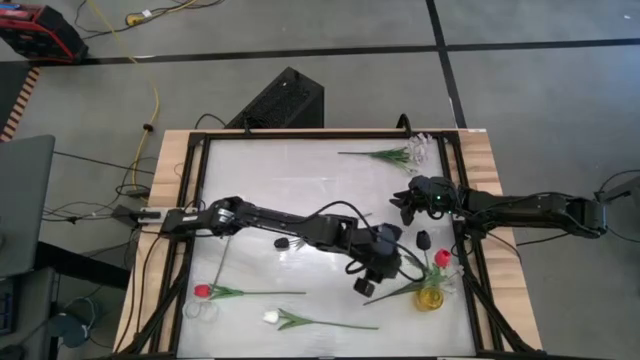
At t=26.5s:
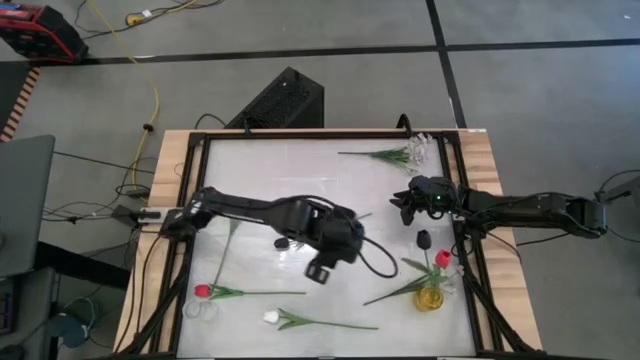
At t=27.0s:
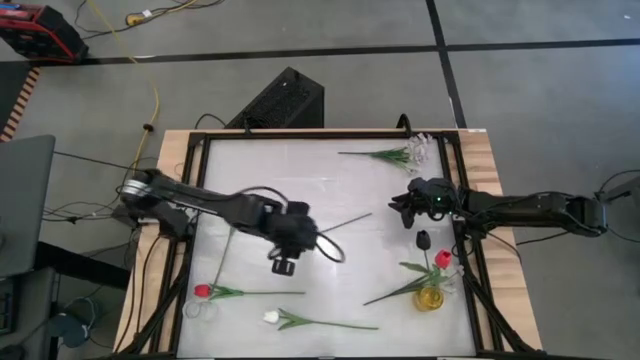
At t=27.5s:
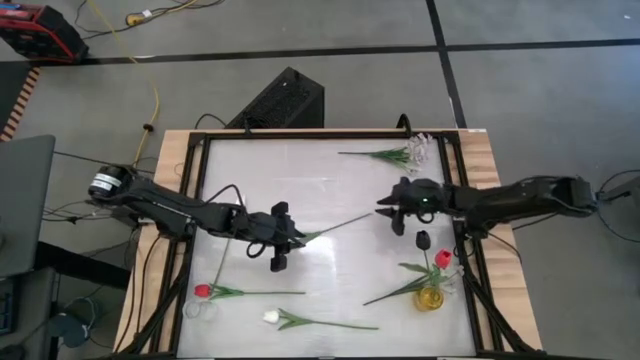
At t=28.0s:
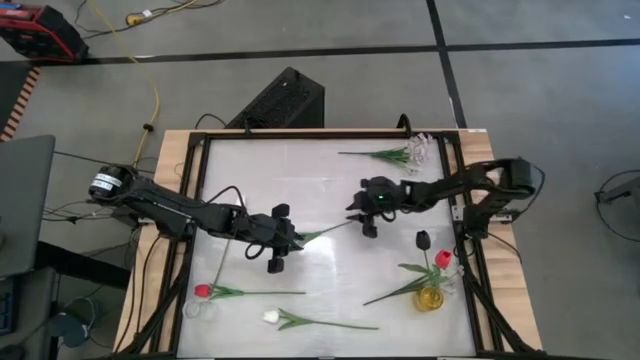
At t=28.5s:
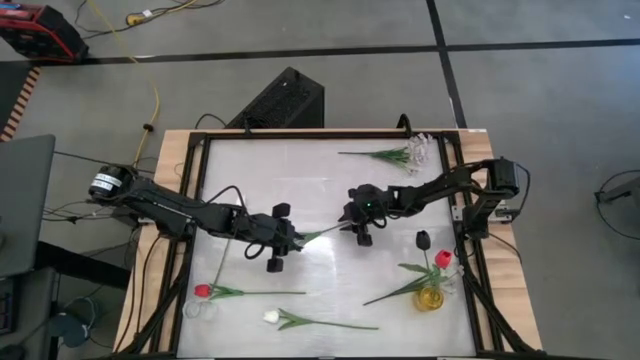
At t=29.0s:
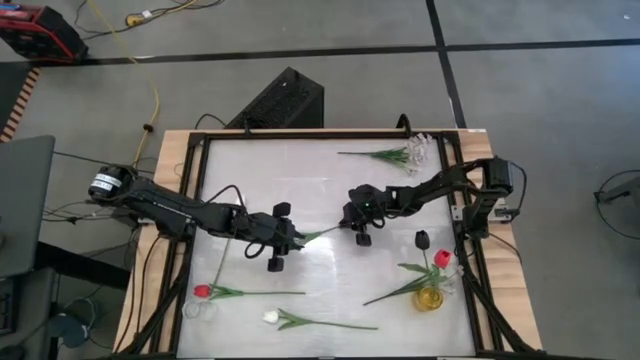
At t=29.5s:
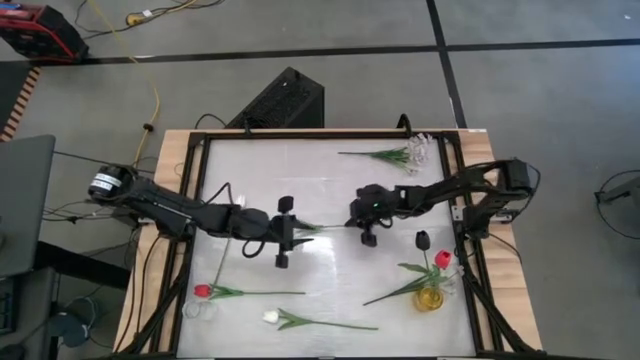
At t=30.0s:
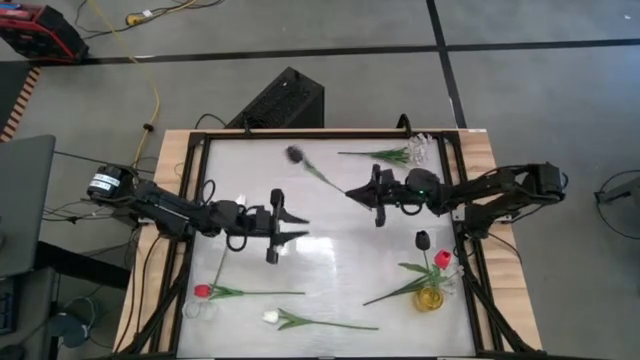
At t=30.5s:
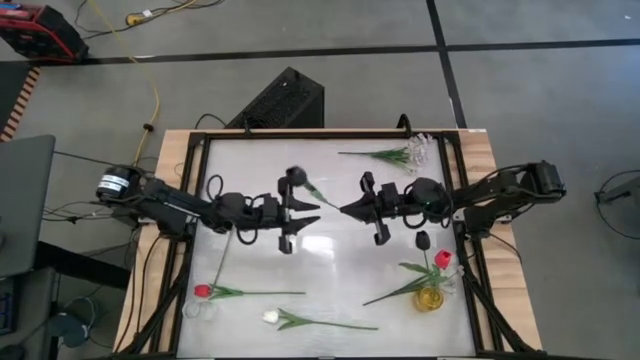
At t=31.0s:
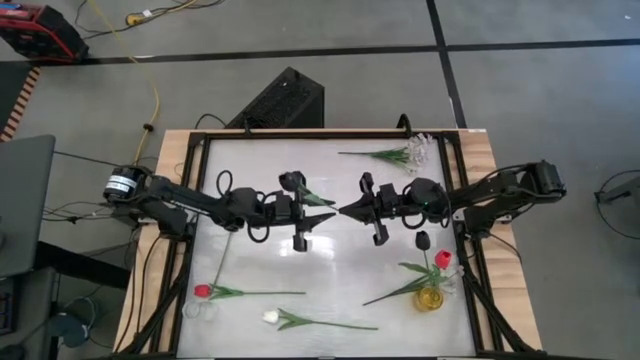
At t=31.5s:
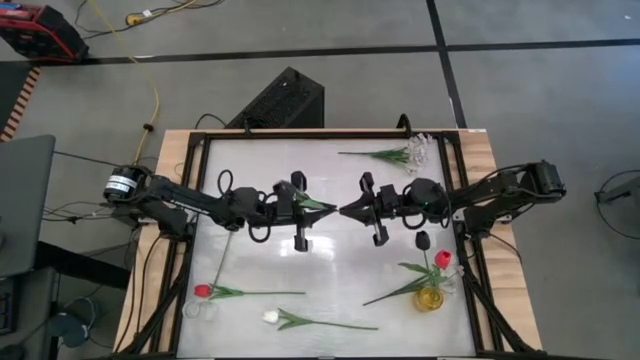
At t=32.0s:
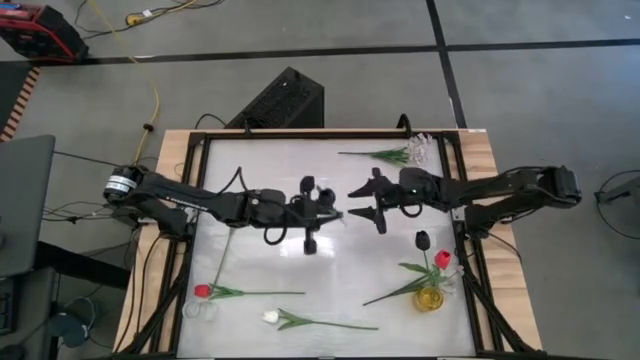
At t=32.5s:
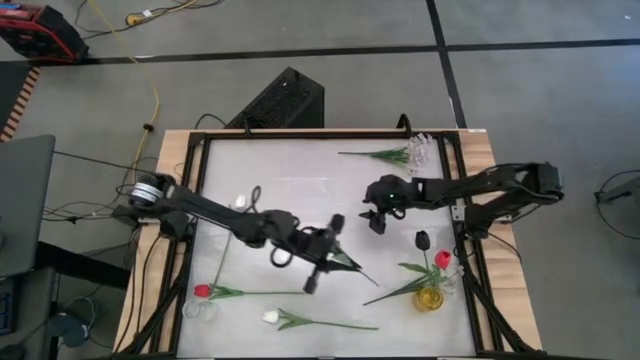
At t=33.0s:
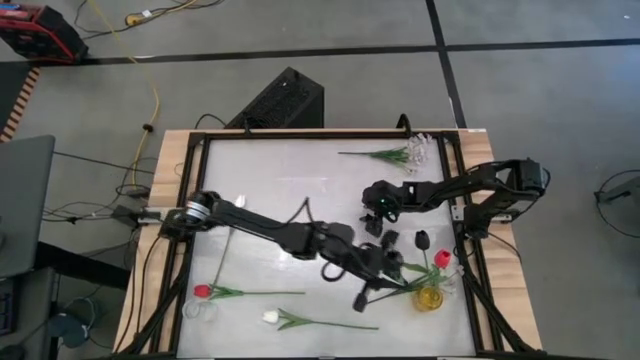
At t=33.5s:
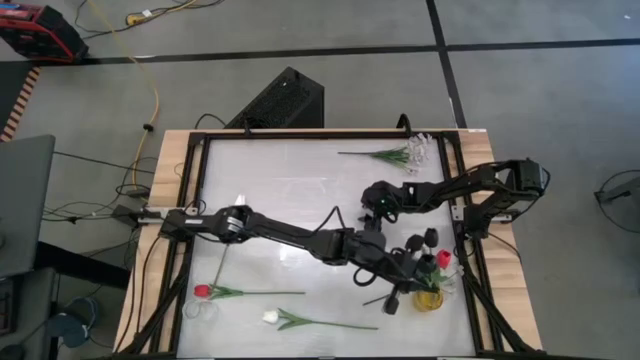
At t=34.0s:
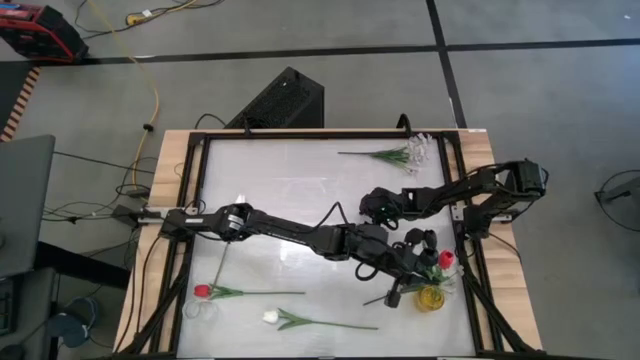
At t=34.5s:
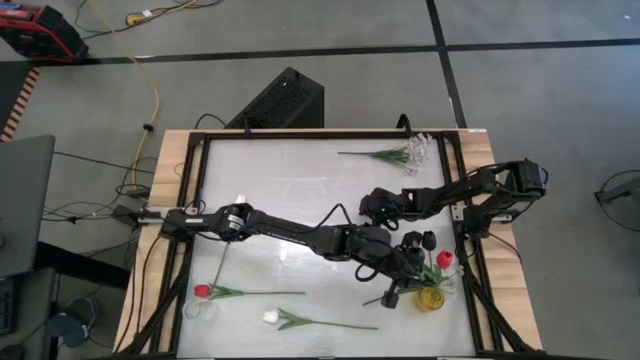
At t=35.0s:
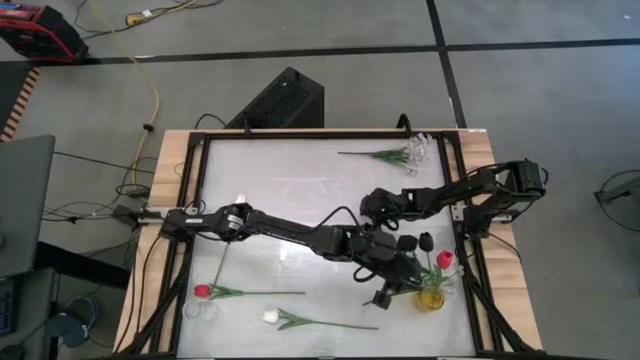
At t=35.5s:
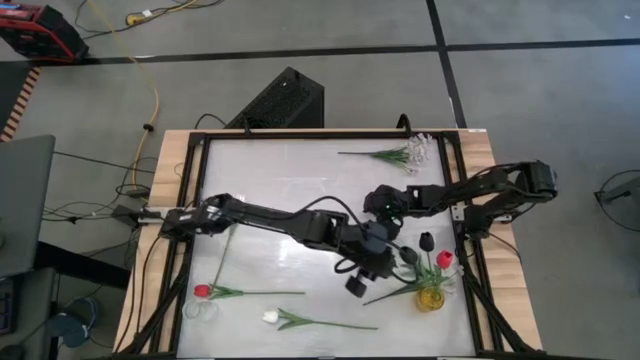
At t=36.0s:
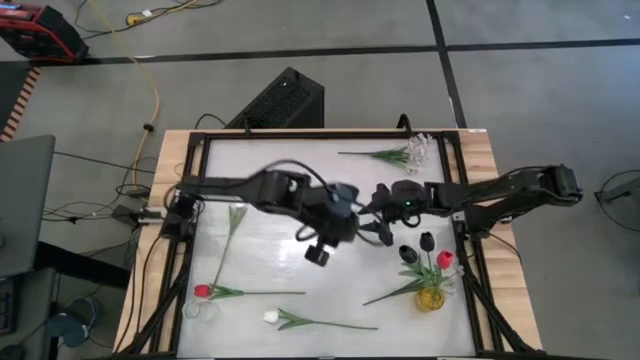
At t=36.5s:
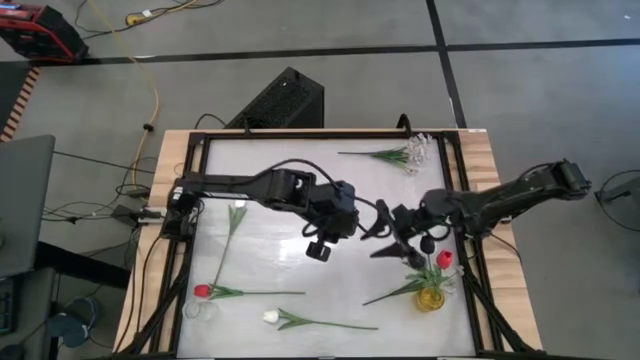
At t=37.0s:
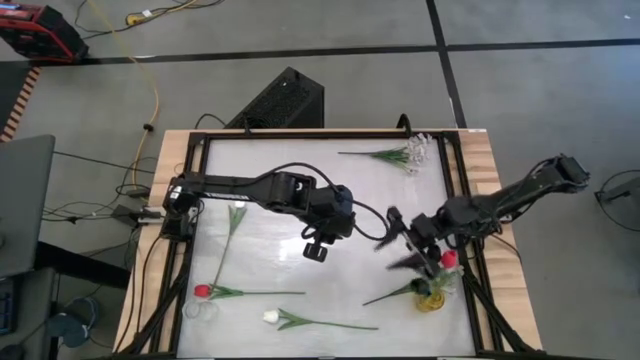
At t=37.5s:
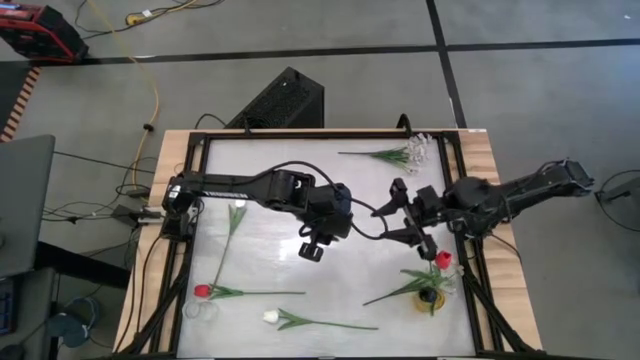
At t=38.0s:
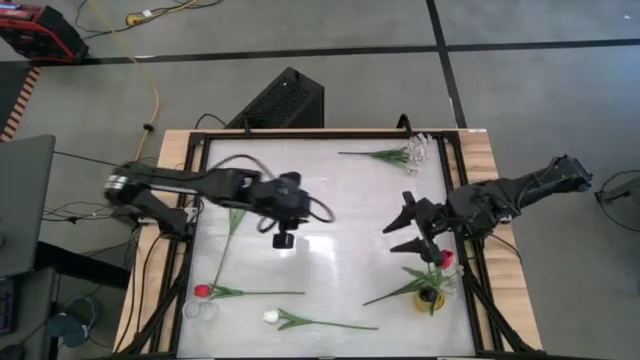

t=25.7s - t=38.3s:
Task: Sort flowers into vase by color
Put the black flower into the yellow vase

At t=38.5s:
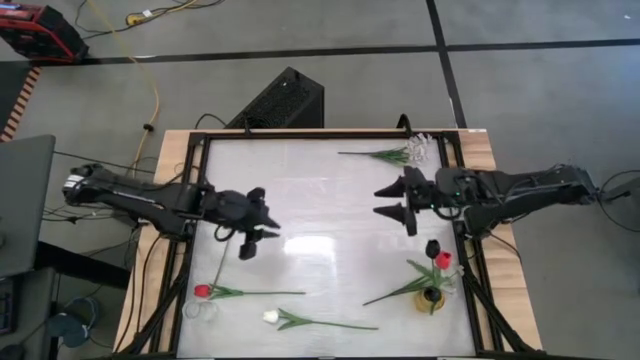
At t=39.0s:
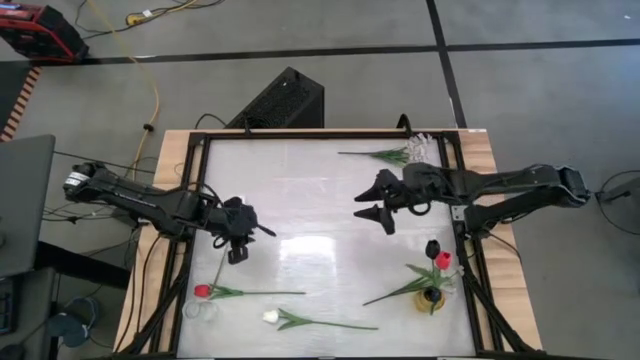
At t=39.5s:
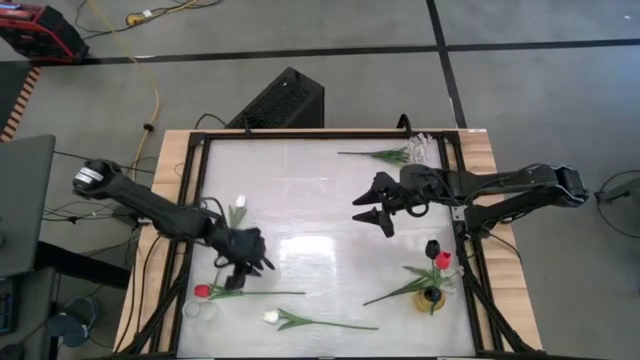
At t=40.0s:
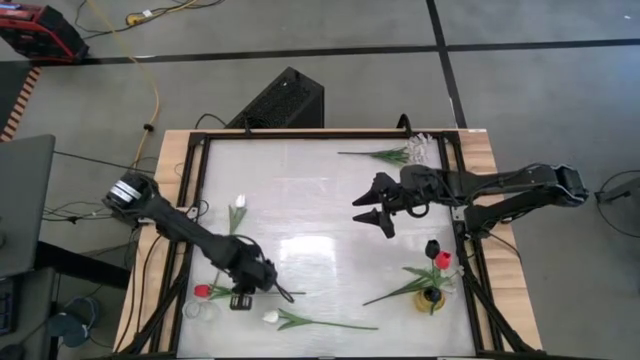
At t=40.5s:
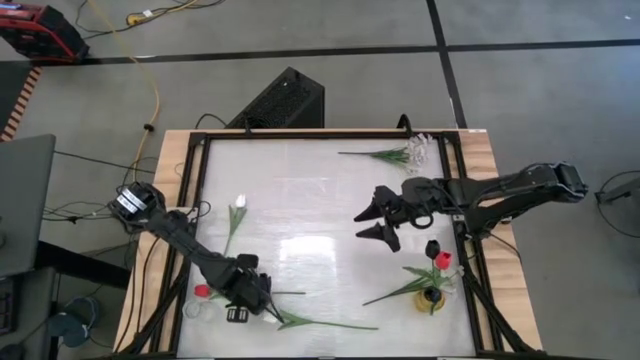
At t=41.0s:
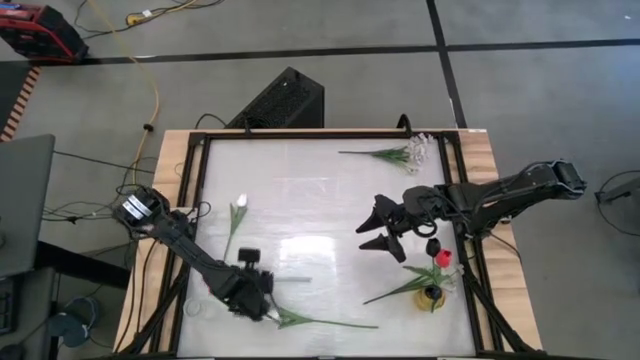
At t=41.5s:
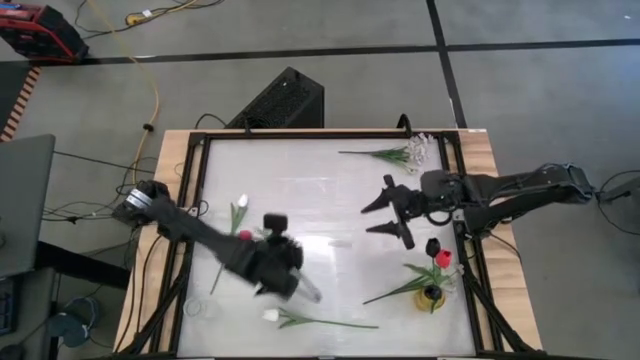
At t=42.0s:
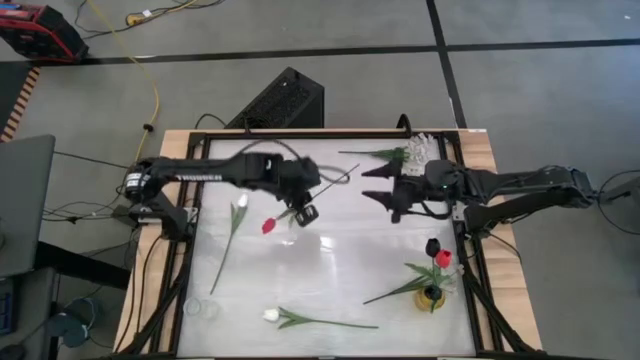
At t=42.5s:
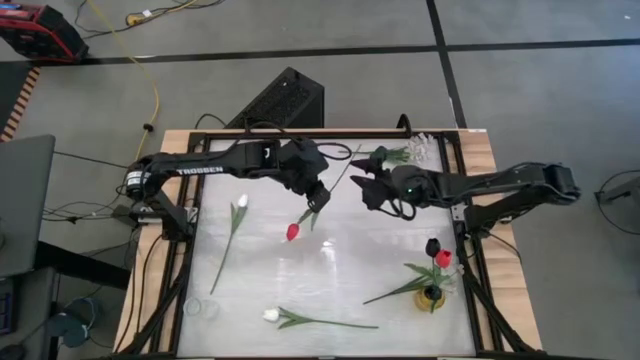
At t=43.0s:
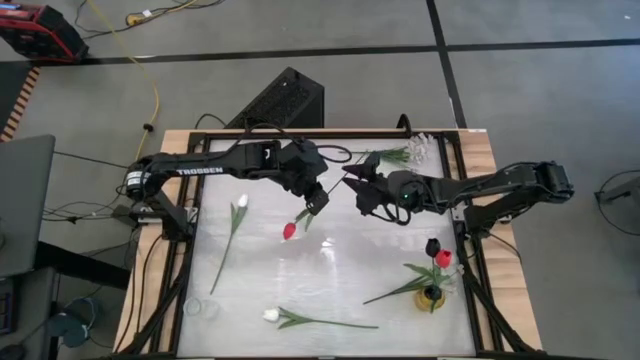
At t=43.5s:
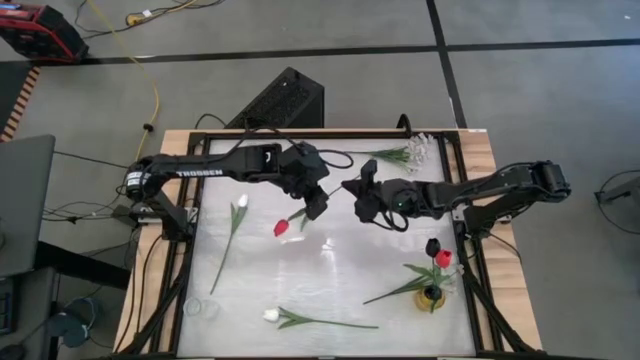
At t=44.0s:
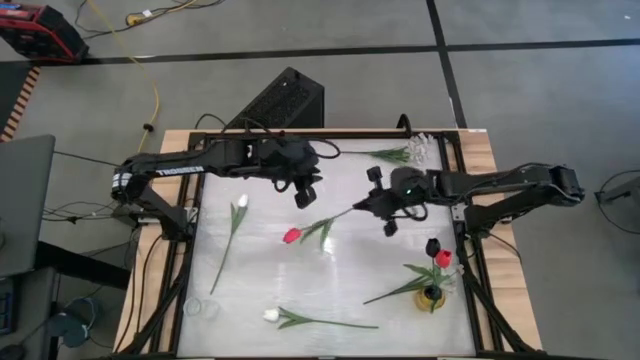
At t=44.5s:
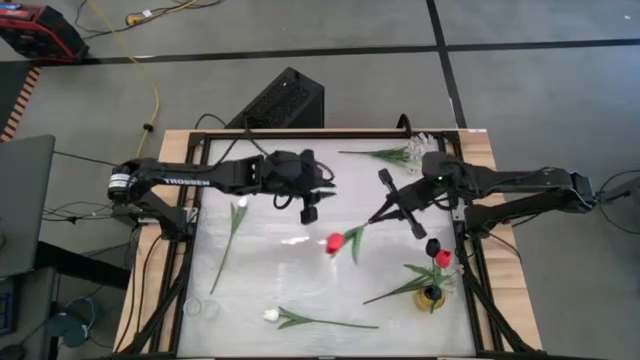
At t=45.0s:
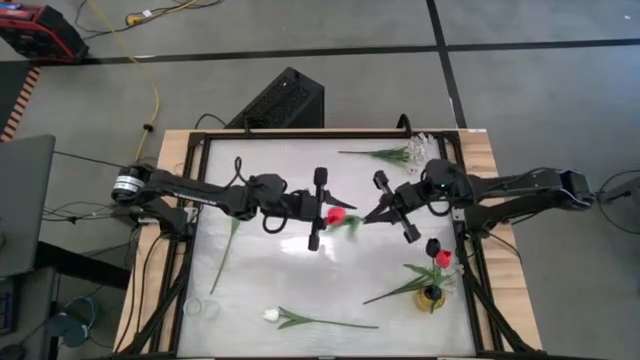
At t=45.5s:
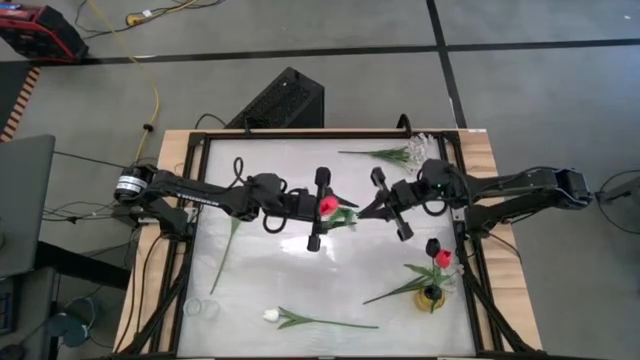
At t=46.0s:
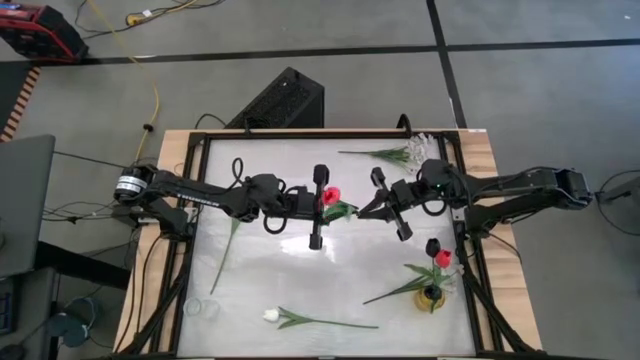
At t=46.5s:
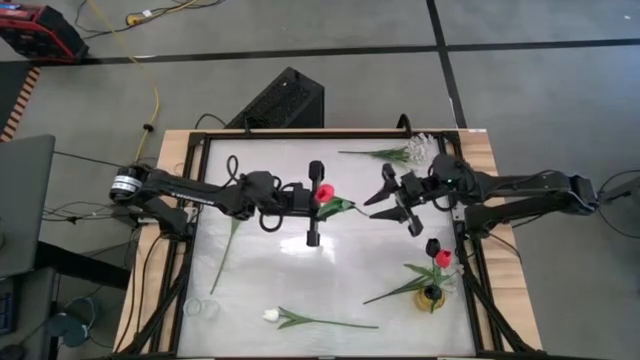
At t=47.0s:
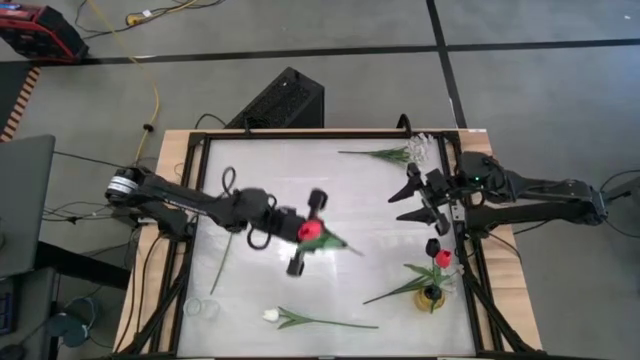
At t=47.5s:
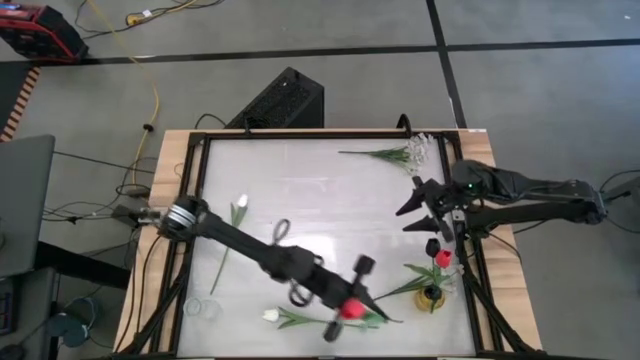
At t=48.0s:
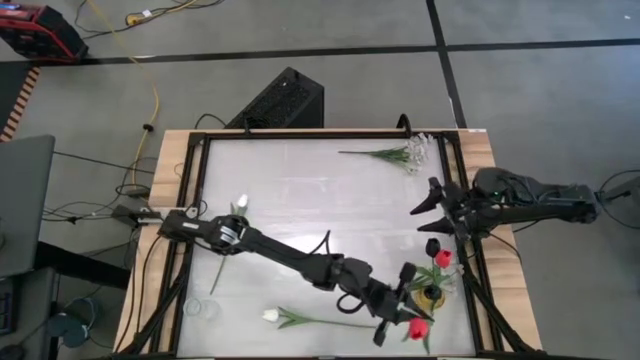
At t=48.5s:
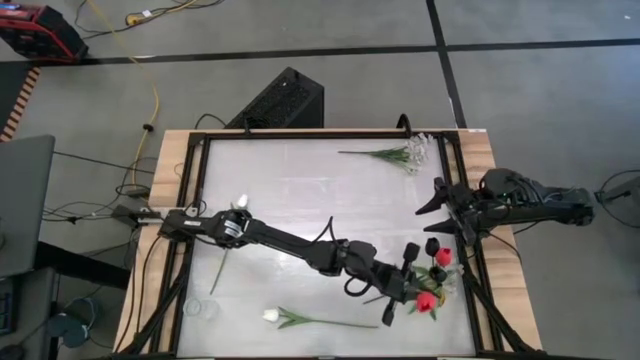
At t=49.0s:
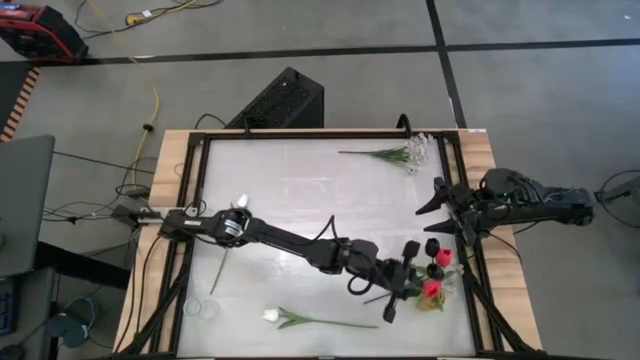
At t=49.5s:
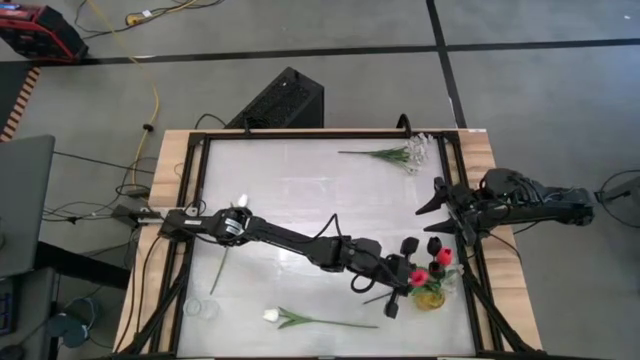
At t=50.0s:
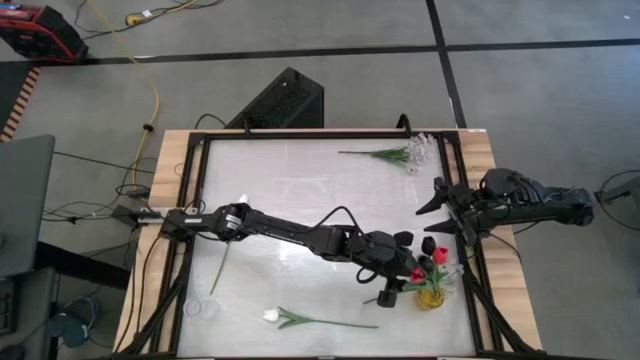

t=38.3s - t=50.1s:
Put the red flower into the yellow vase
